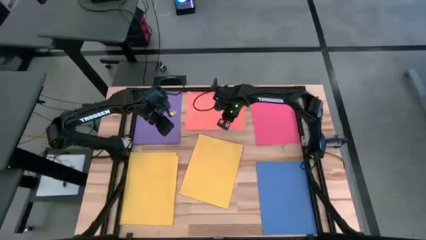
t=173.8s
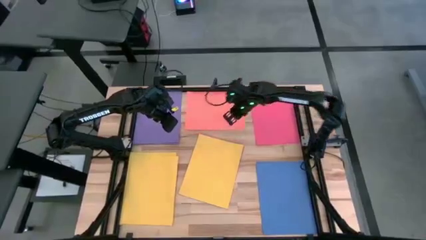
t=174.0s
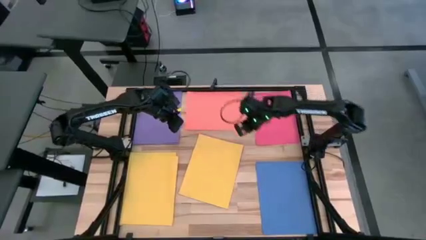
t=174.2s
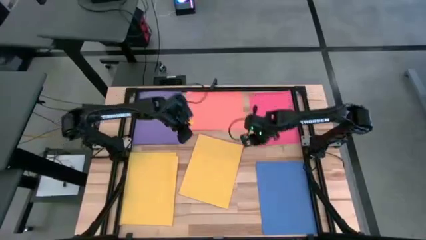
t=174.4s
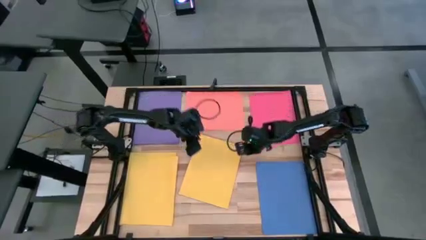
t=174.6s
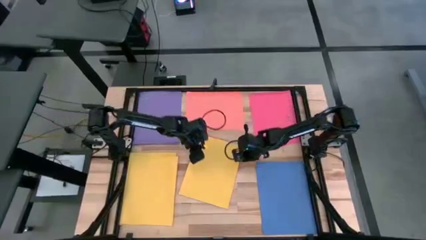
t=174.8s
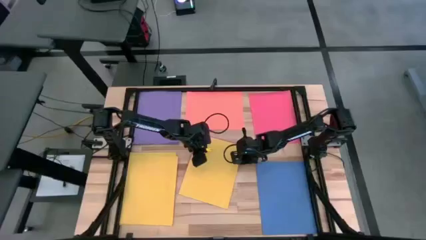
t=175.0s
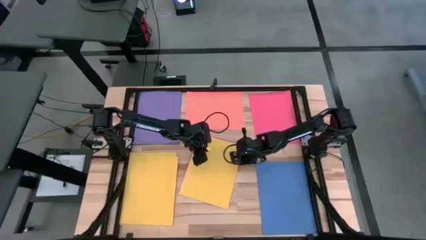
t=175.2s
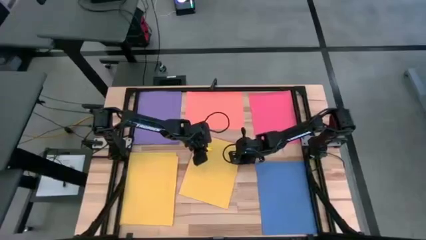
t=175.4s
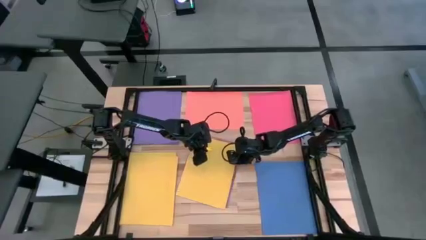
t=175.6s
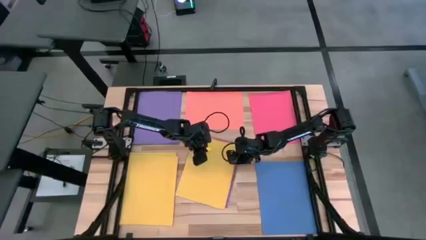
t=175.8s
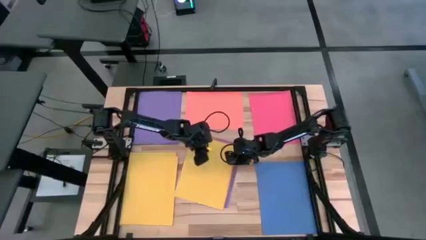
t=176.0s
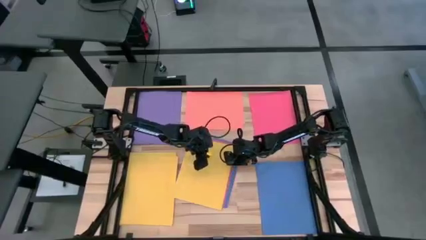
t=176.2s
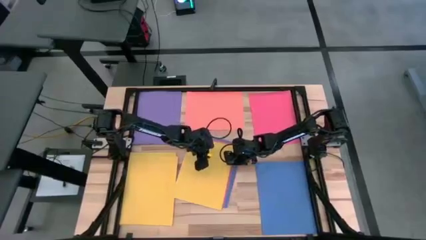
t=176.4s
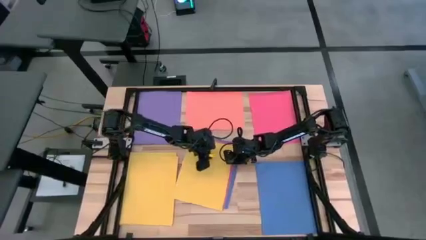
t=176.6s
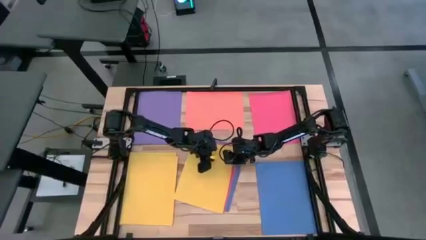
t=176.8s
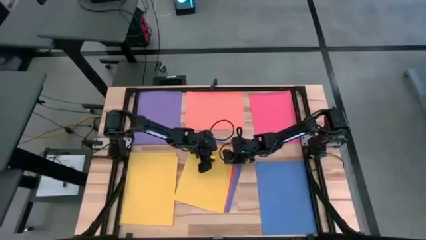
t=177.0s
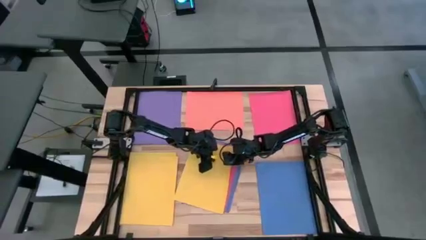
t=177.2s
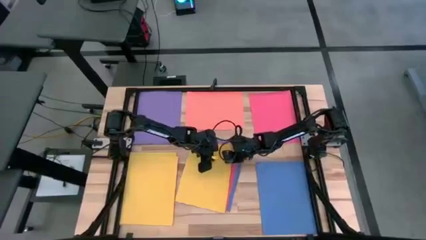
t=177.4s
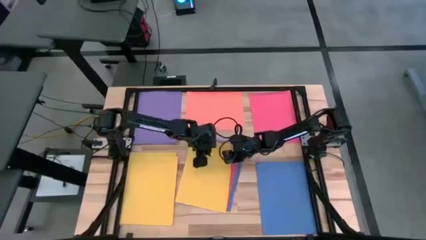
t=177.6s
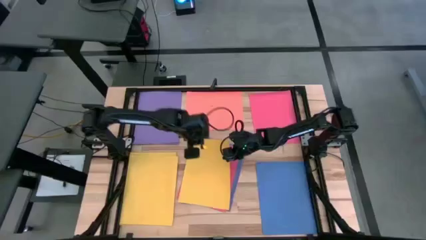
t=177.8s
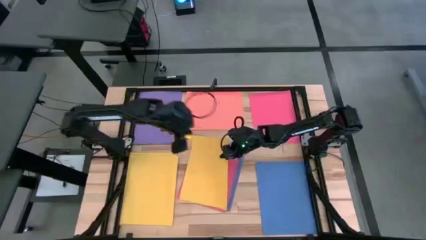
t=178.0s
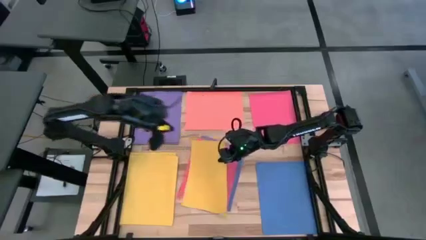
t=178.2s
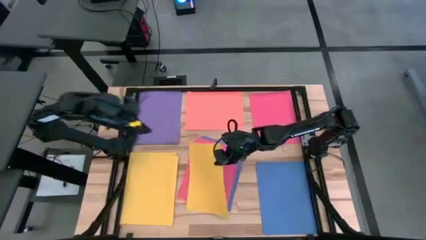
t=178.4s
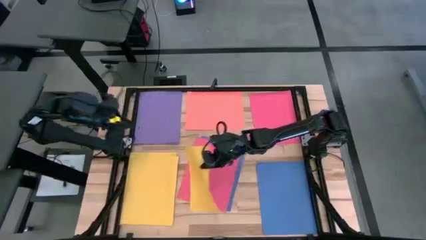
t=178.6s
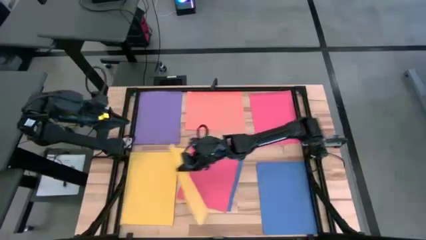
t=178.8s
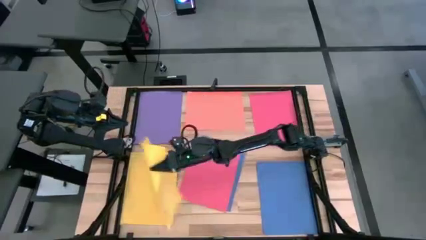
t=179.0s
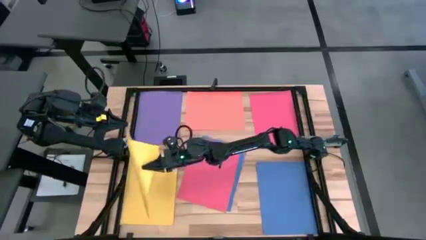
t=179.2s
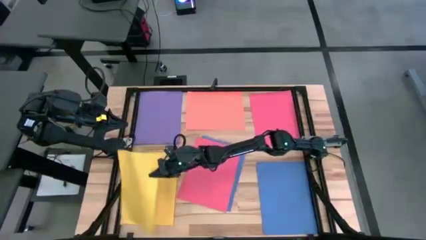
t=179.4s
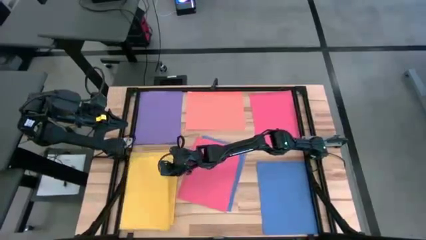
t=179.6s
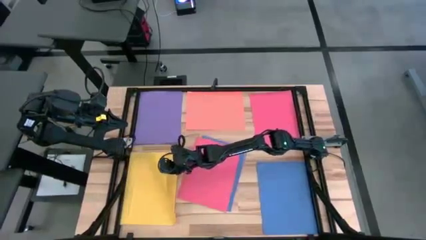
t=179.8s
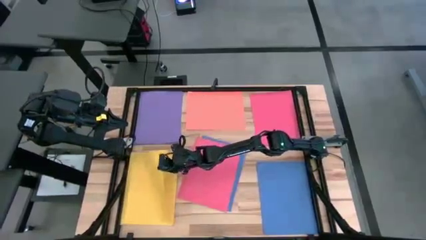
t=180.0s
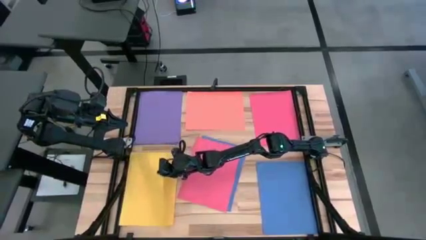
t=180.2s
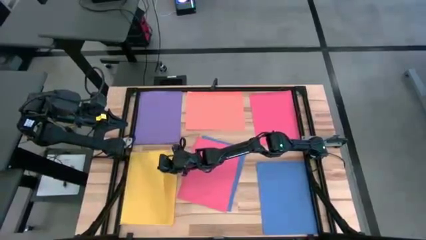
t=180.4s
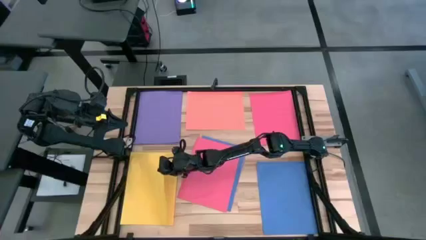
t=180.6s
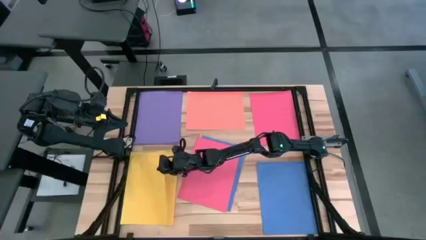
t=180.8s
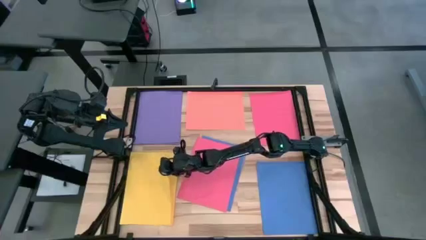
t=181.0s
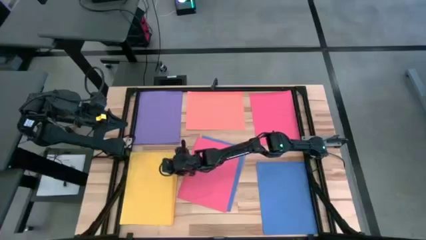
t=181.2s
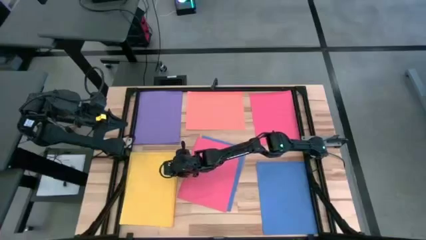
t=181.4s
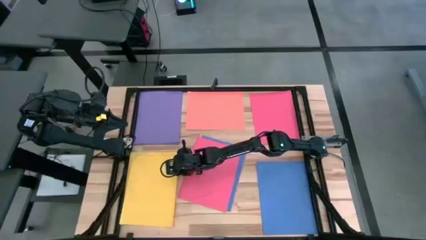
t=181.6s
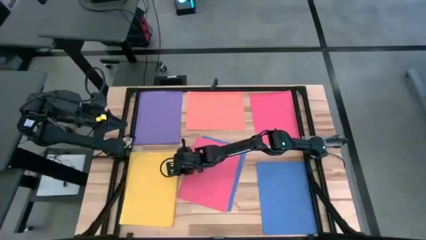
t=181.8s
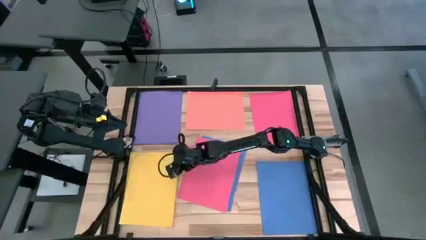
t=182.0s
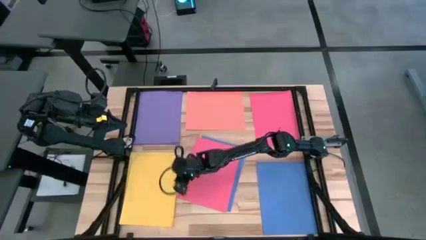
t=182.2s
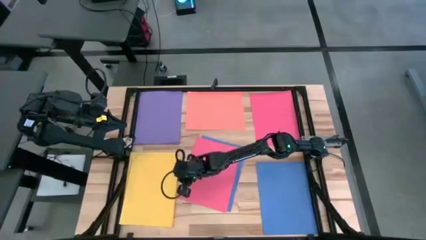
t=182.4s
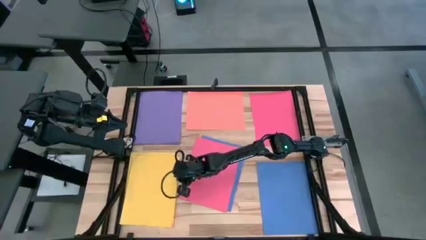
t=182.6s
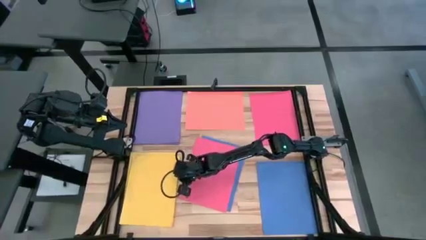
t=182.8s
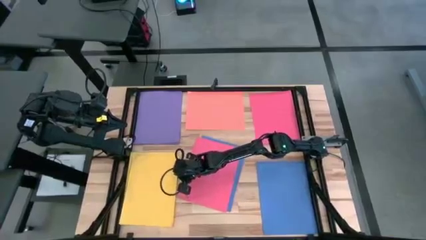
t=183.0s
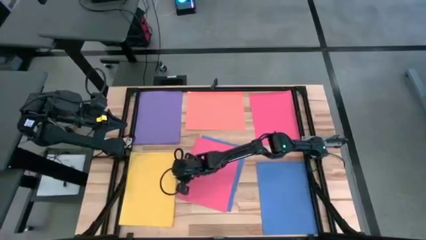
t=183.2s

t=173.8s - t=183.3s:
Task: Organize paper
Stack the yellow paper on top of the other yellow paper

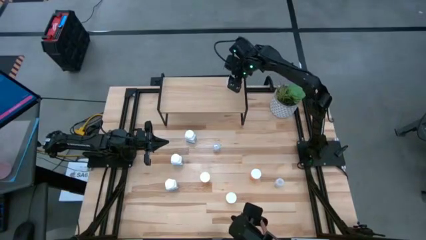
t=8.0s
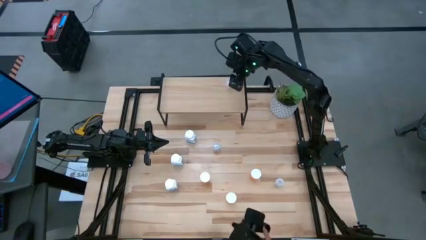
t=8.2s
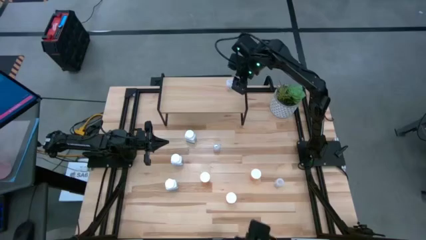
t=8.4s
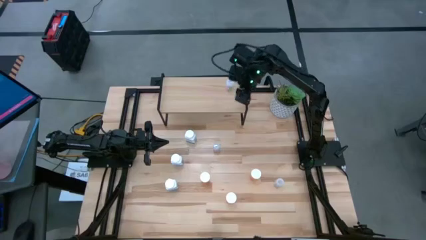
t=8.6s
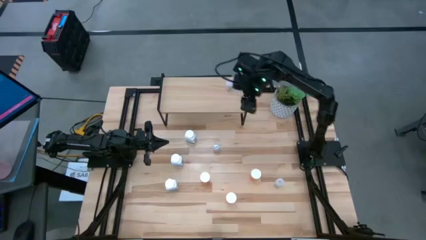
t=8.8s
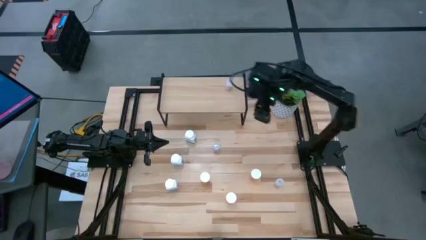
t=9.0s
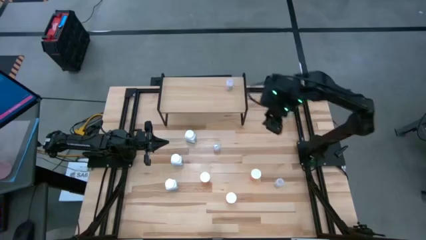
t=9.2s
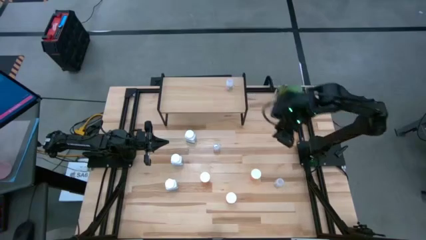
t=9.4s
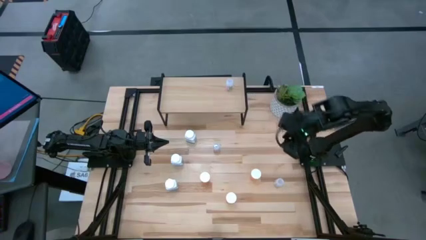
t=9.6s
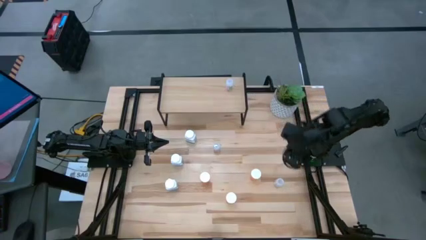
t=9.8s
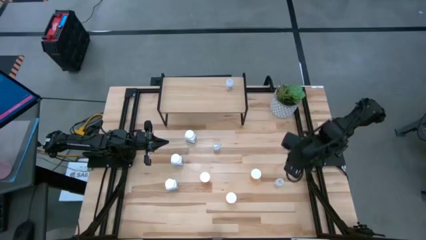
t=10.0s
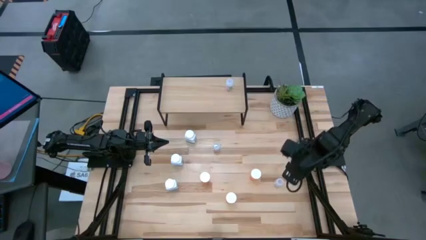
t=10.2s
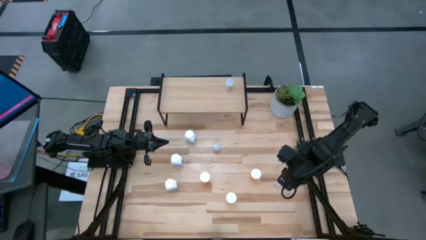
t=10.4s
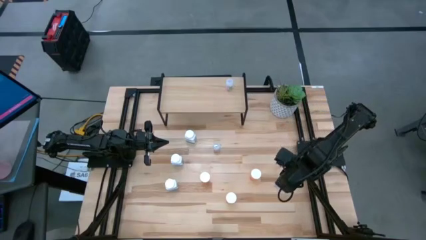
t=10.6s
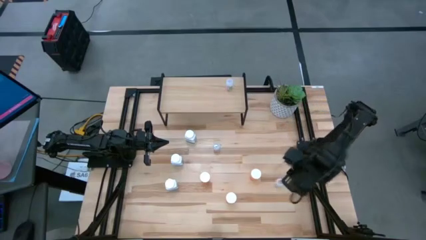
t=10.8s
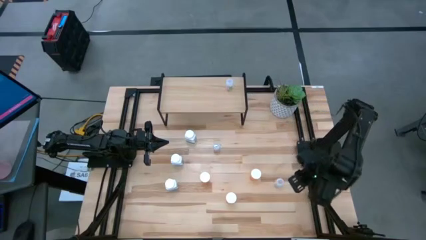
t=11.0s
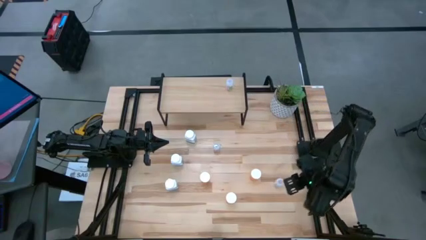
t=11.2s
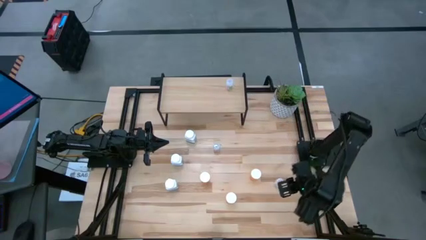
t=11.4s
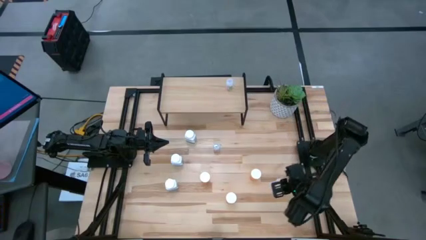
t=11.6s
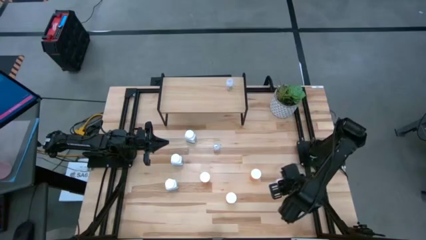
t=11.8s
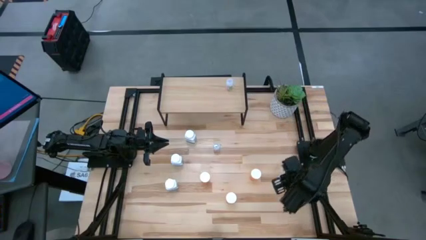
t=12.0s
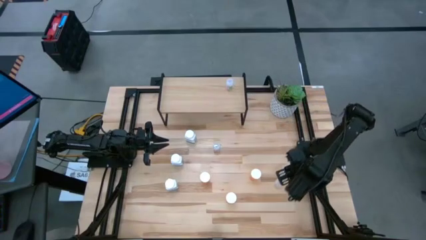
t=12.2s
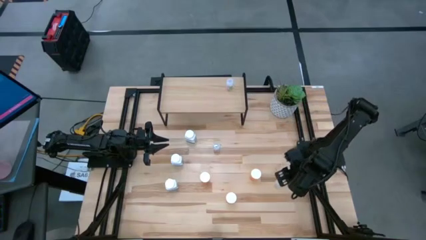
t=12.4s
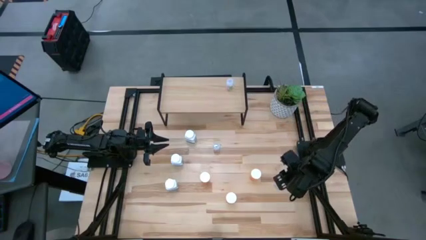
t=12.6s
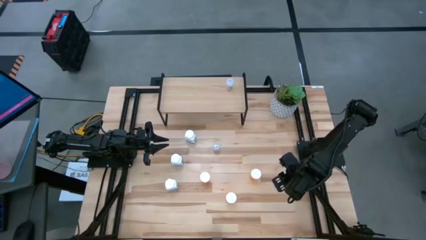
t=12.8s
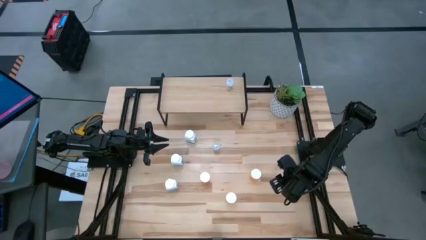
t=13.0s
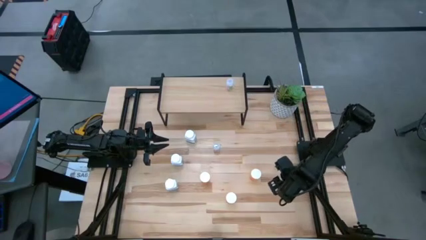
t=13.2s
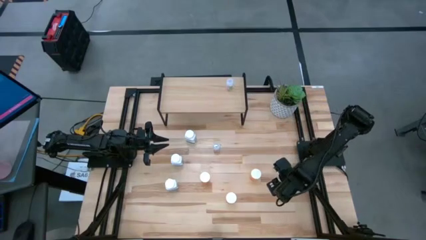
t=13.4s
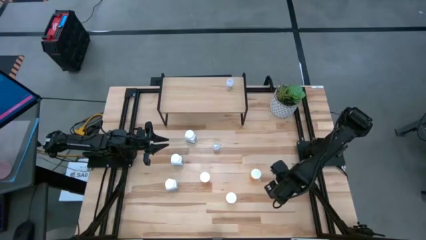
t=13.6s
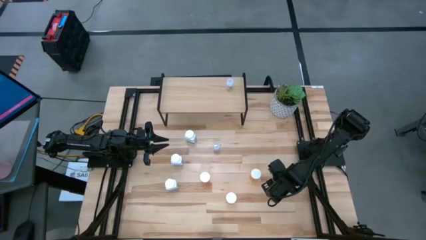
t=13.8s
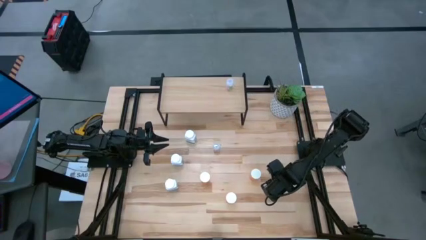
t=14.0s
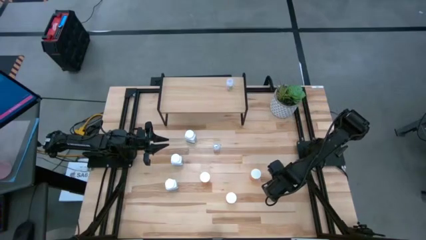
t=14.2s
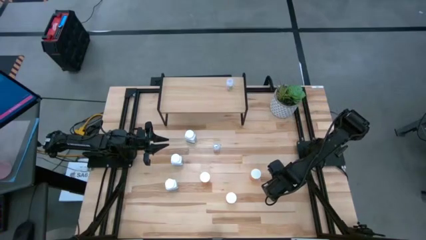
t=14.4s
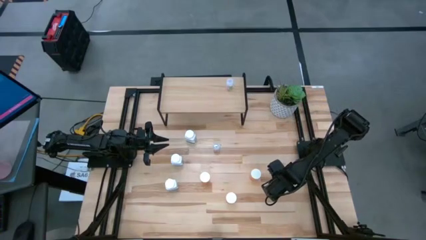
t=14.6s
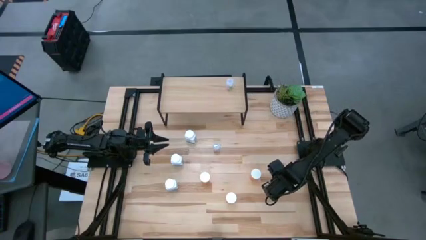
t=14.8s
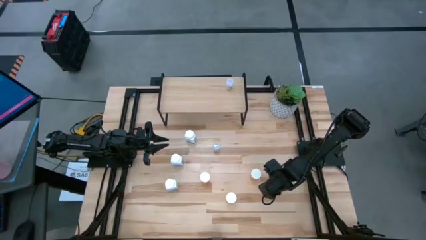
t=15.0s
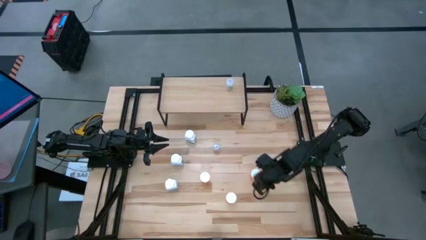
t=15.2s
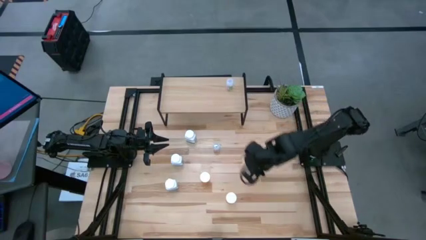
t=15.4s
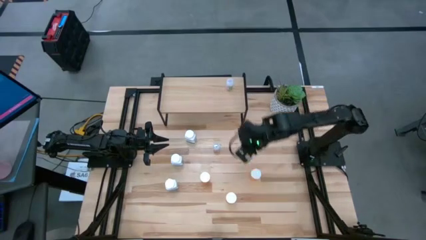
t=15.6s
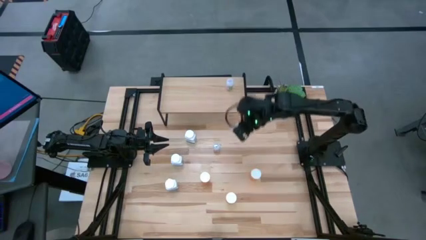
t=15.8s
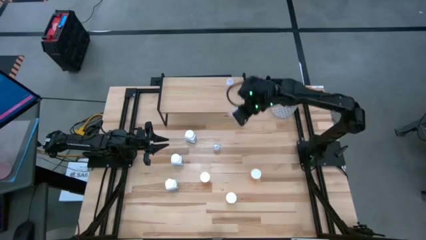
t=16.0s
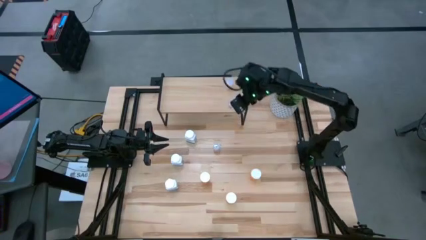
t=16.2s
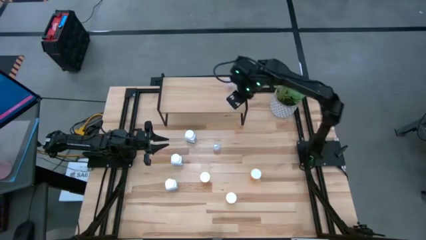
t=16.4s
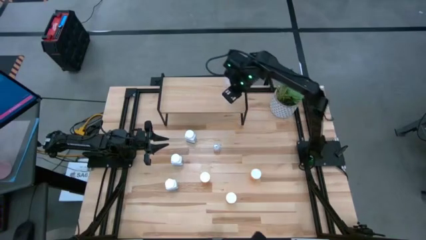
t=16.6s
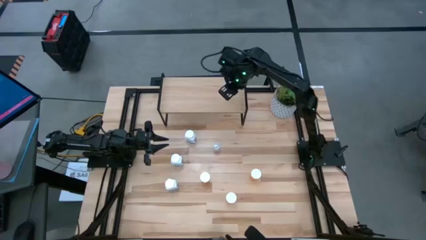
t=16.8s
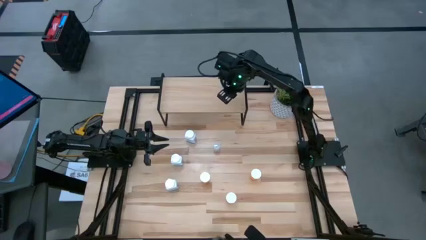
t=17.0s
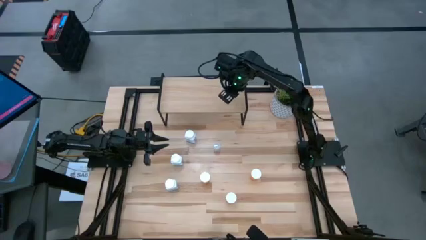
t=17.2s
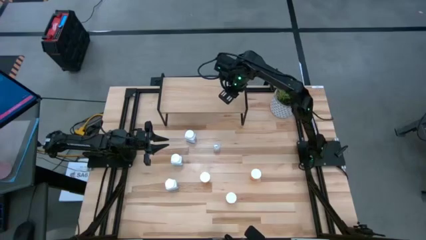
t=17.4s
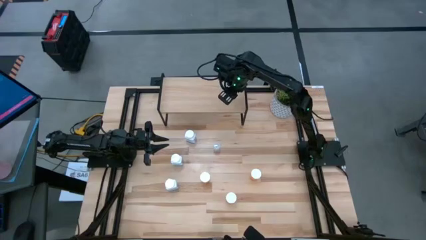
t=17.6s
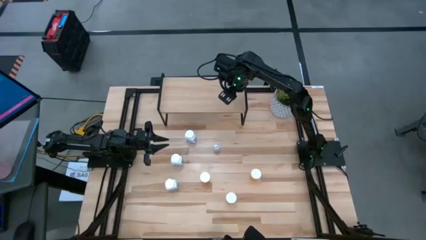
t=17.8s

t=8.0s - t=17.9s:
Task: Pick and place medicine bottles onto shelf by color
Put the bottom transparent pill bottle aligned with the other transparent pill bottle on the shelf
